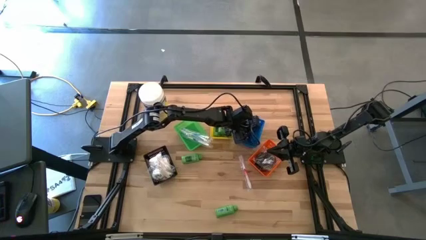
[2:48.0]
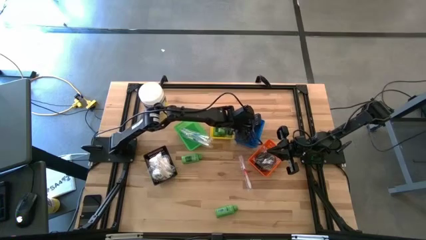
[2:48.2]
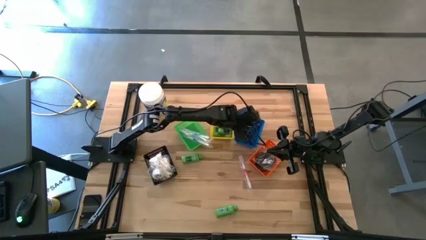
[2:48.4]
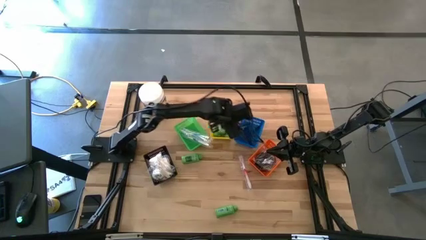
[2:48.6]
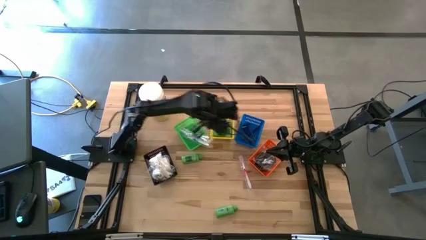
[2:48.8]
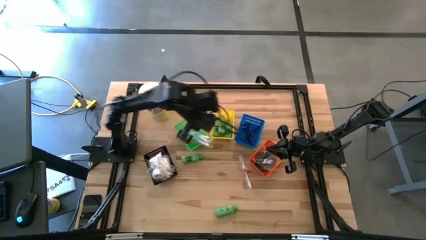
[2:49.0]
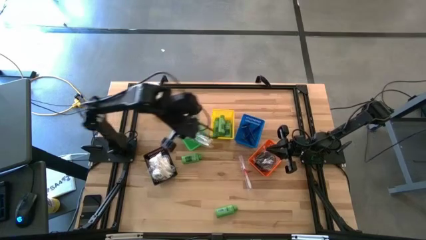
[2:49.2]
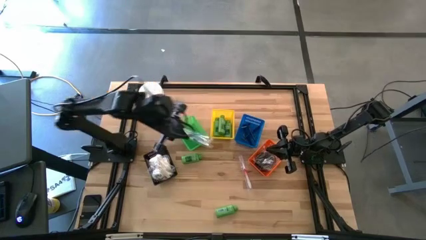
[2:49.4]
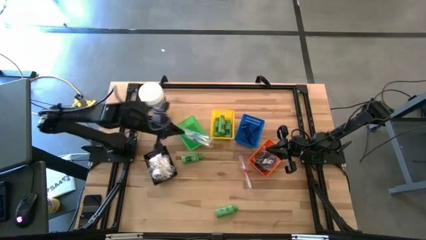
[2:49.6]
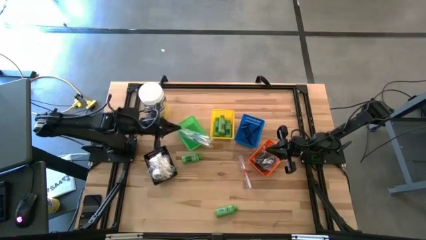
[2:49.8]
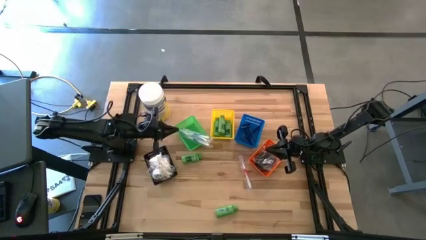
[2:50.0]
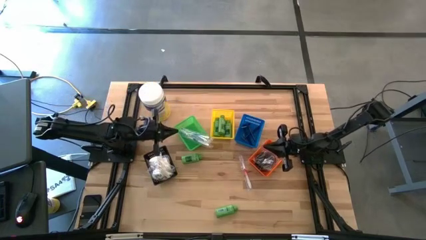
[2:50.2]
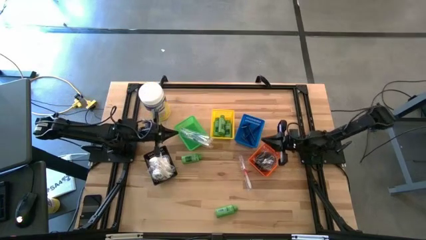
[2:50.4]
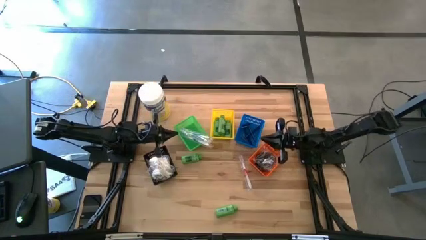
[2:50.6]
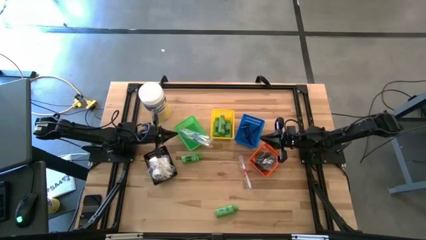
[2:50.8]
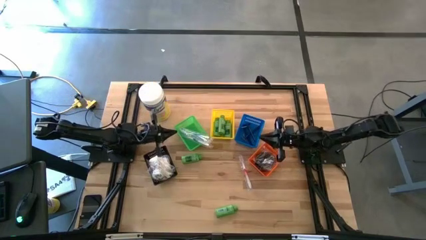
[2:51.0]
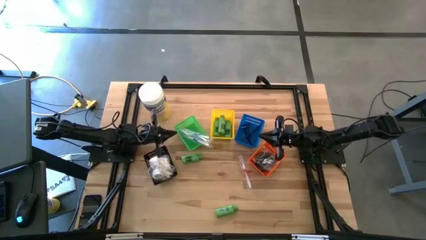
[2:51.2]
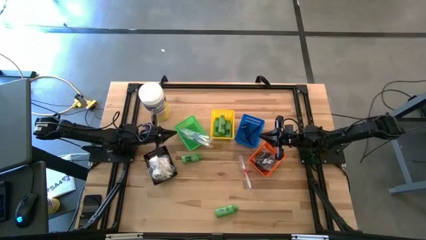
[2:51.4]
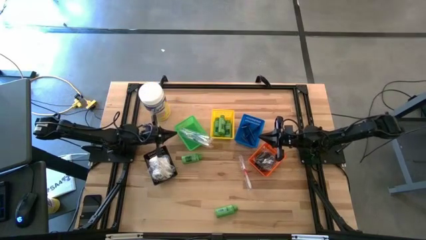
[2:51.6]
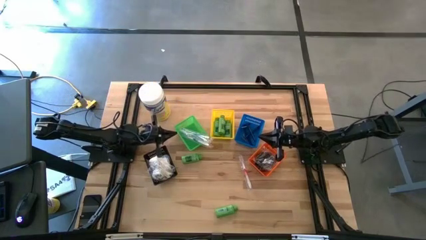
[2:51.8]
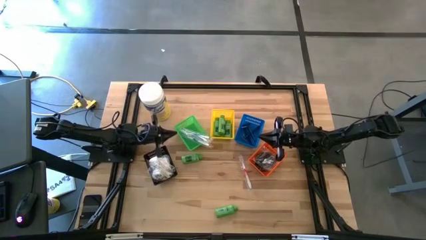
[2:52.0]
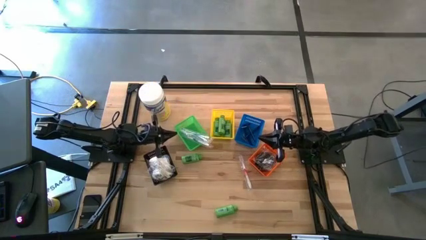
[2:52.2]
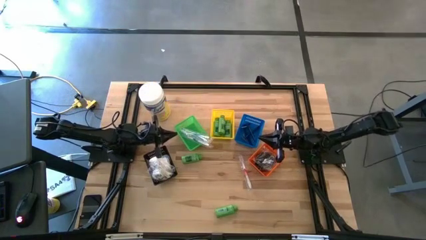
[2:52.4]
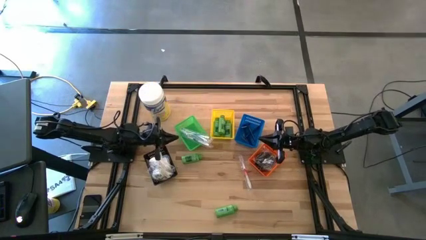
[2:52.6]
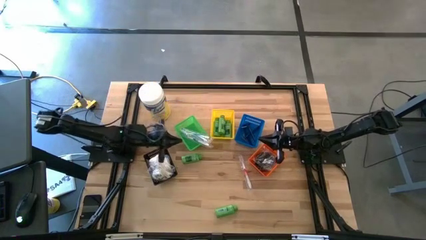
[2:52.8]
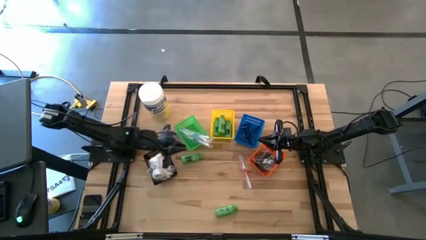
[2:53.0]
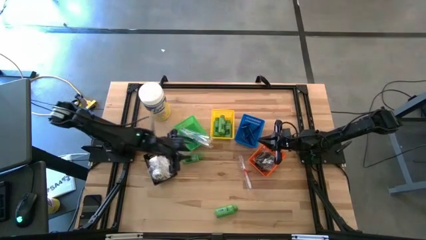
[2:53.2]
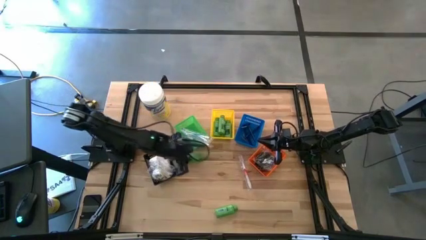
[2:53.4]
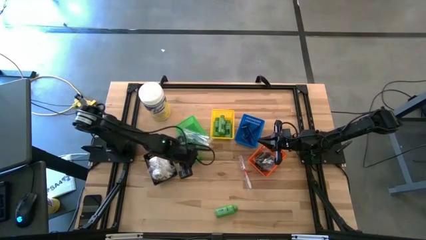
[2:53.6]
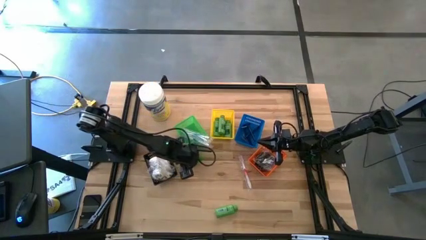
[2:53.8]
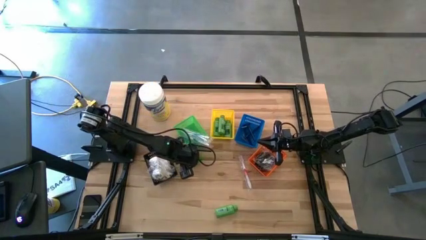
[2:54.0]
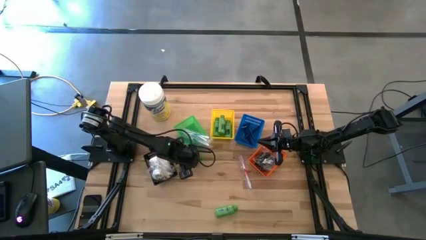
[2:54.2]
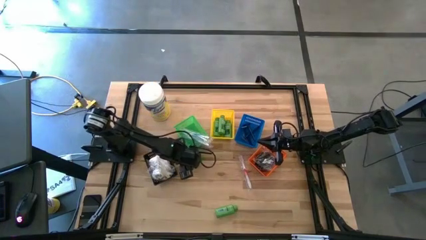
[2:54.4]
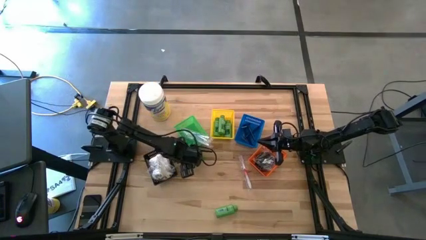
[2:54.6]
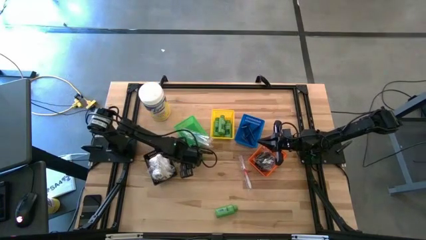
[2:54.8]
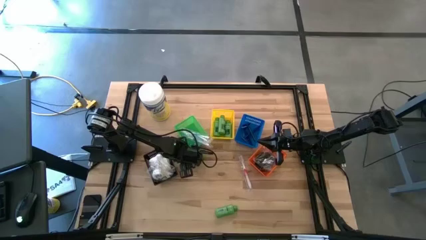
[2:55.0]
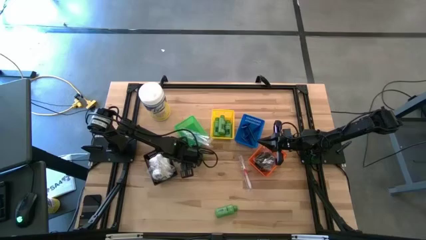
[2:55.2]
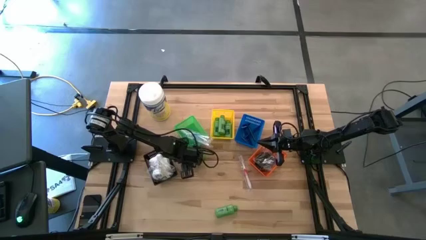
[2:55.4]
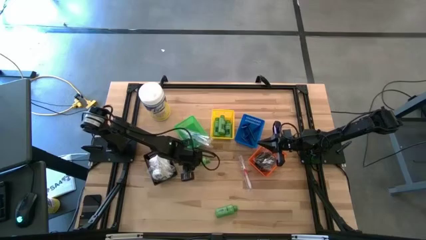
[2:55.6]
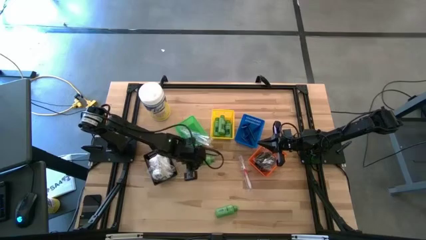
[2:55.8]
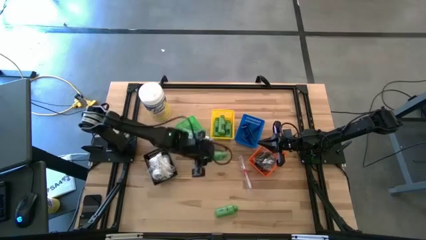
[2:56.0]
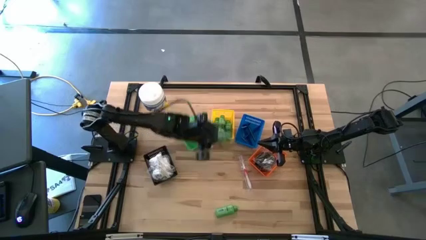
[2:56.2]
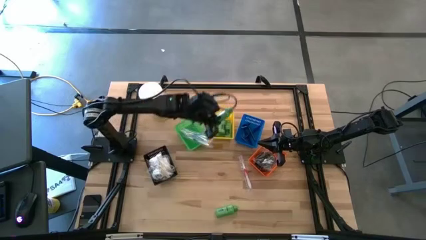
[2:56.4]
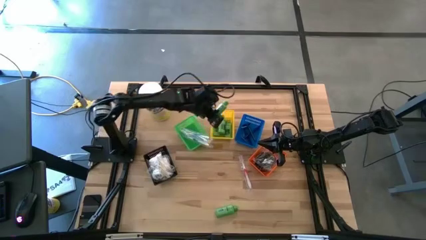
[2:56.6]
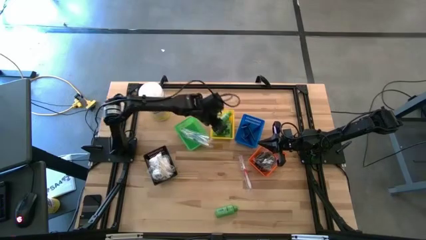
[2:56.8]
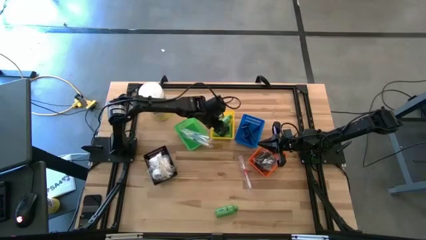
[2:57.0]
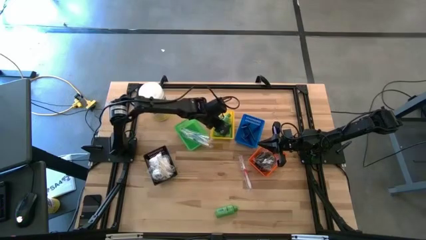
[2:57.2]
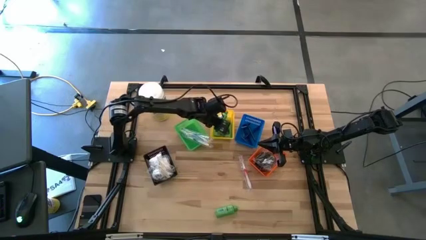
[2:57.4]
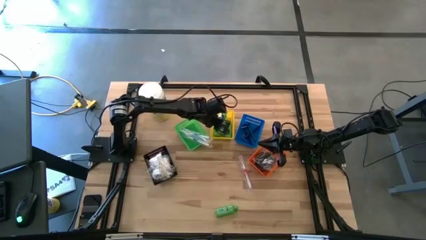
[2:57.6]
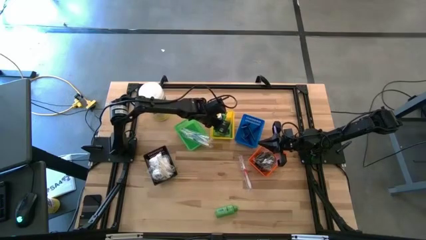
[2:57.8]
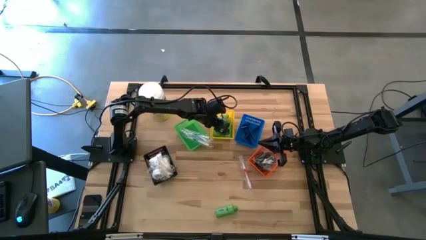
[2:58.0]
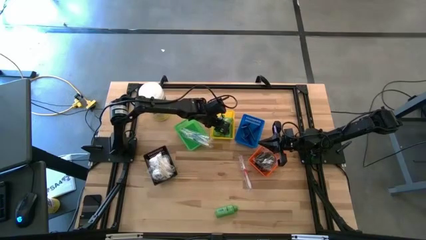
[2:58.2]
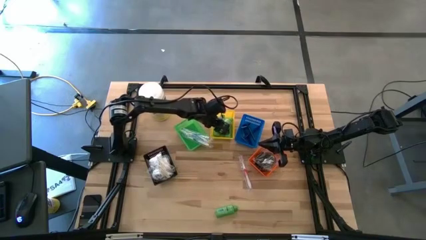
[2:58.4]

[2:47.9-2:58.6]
Task: Pick & Place Travel size toiletries
Put the shampoo bottle into the yellow bin
